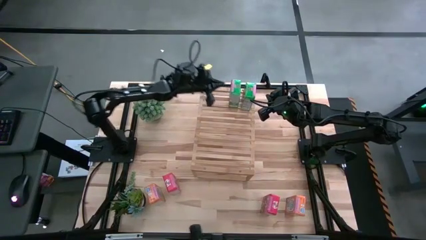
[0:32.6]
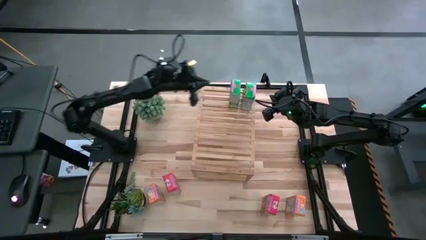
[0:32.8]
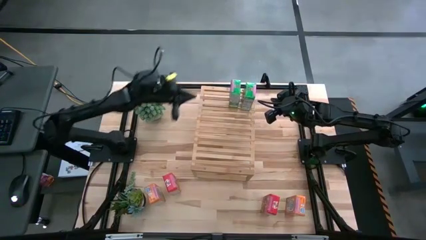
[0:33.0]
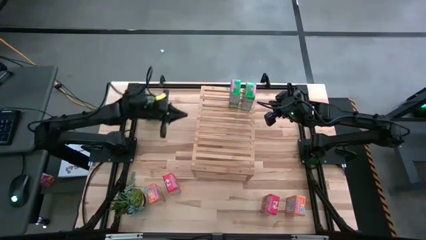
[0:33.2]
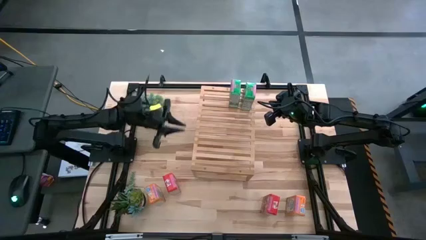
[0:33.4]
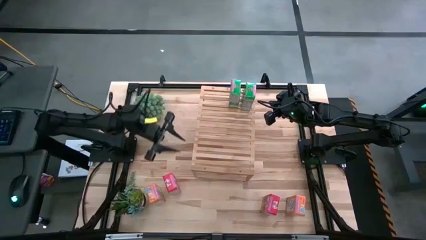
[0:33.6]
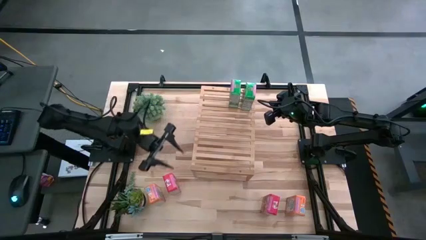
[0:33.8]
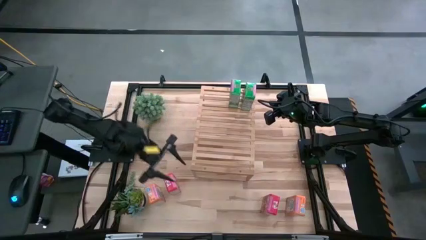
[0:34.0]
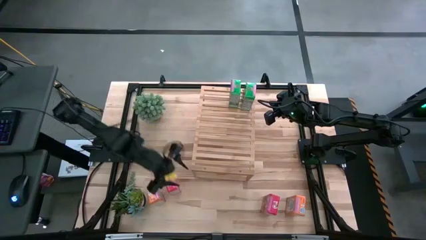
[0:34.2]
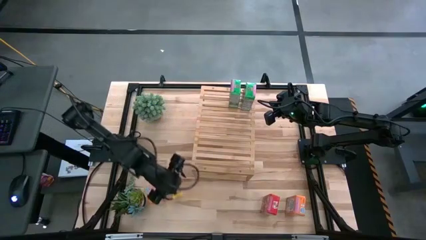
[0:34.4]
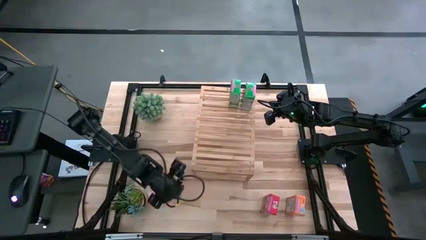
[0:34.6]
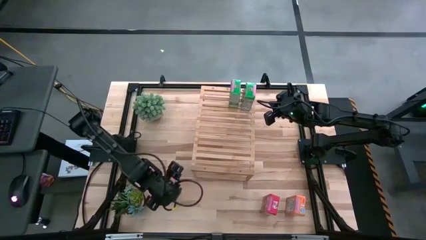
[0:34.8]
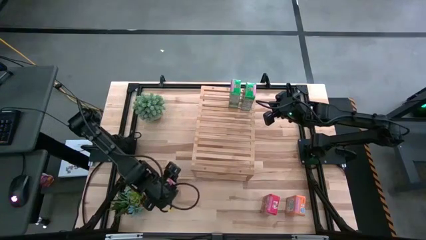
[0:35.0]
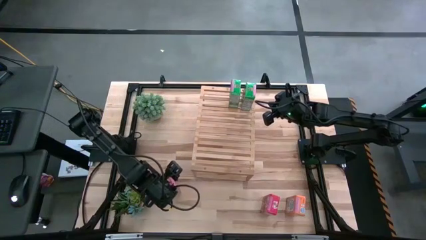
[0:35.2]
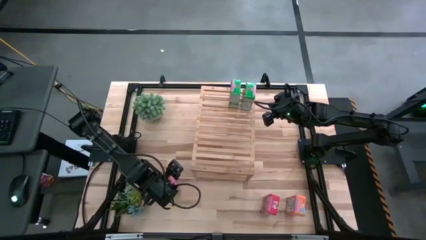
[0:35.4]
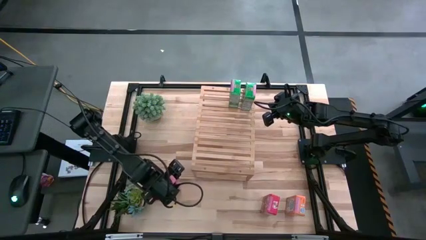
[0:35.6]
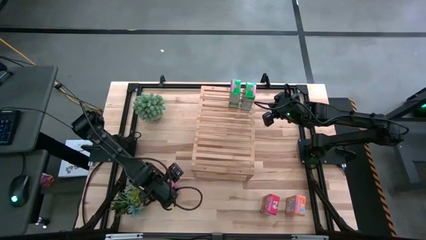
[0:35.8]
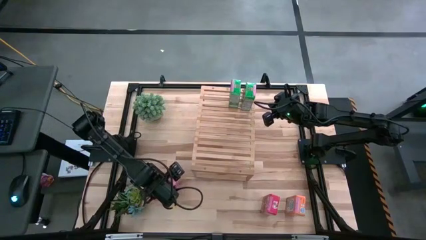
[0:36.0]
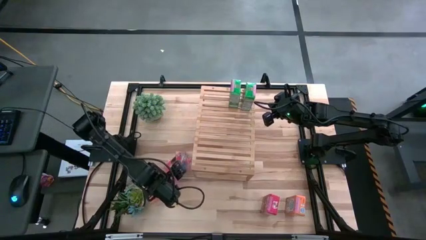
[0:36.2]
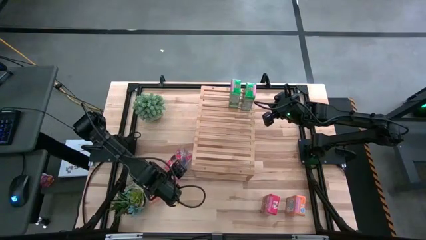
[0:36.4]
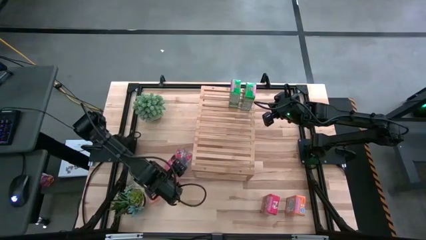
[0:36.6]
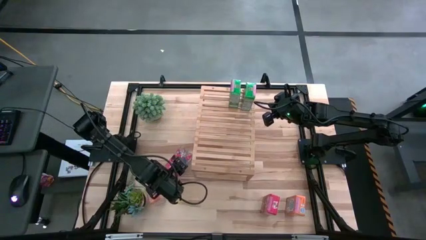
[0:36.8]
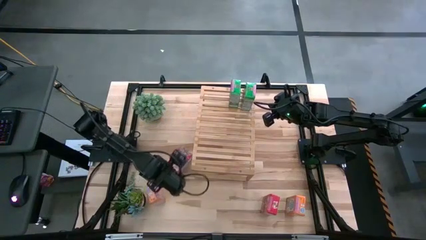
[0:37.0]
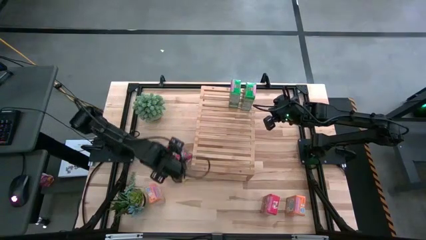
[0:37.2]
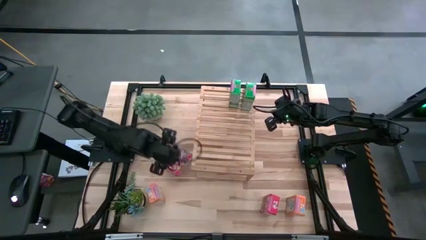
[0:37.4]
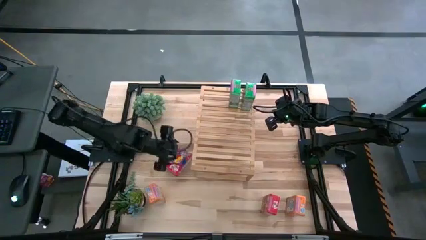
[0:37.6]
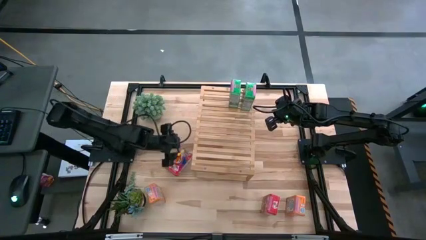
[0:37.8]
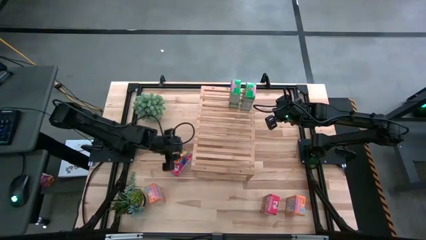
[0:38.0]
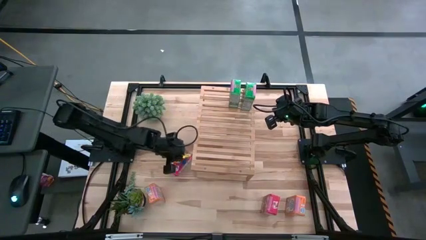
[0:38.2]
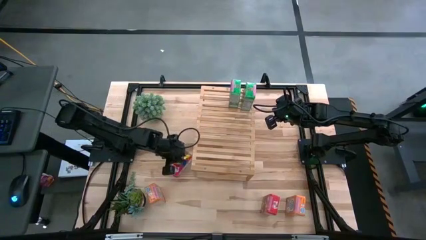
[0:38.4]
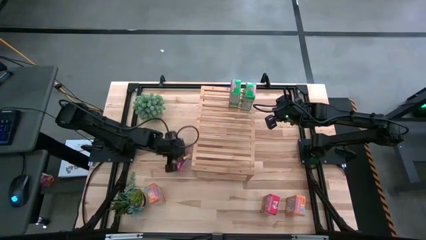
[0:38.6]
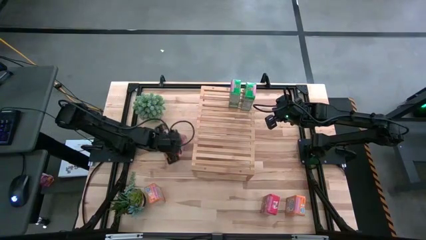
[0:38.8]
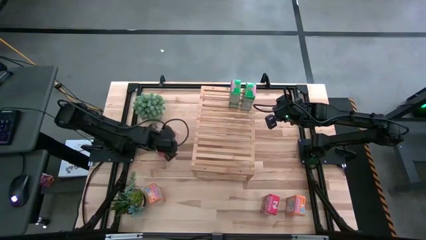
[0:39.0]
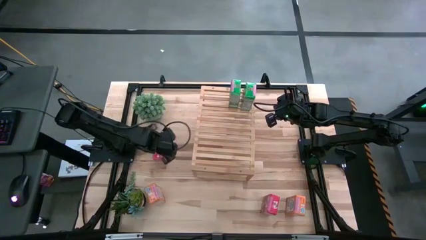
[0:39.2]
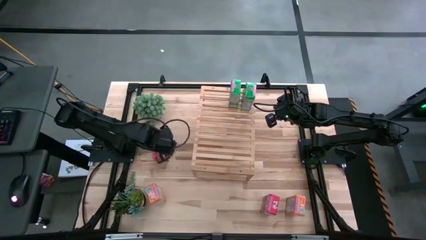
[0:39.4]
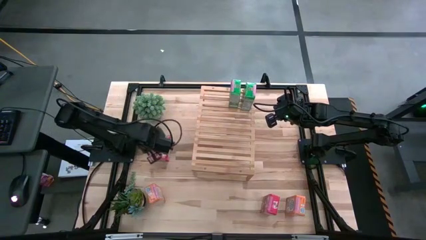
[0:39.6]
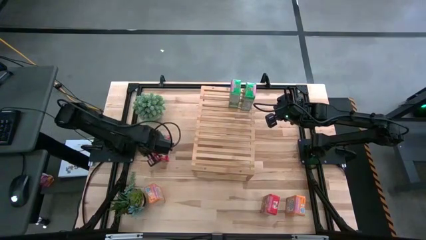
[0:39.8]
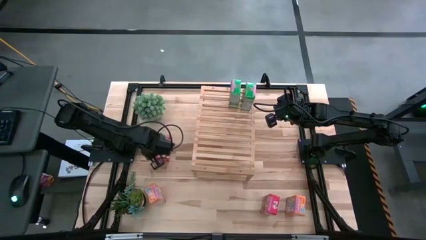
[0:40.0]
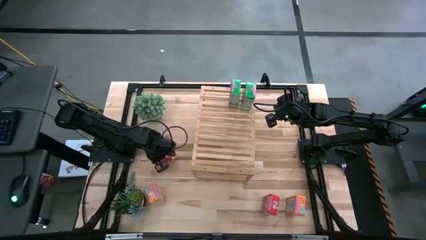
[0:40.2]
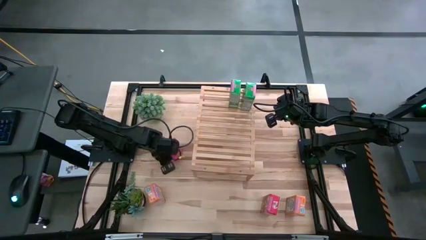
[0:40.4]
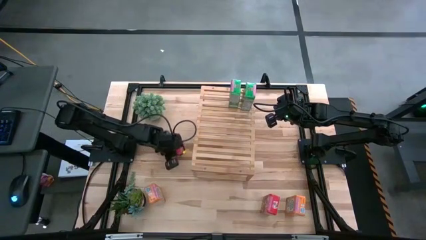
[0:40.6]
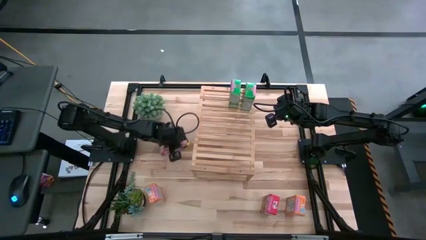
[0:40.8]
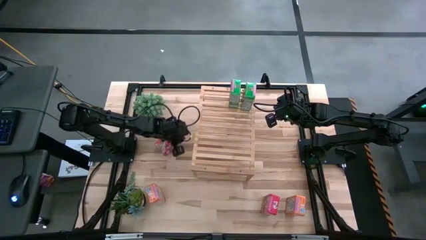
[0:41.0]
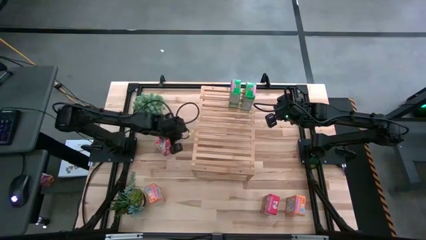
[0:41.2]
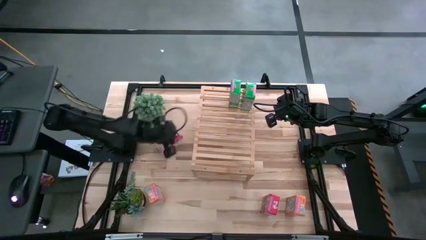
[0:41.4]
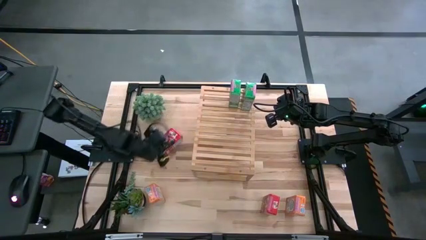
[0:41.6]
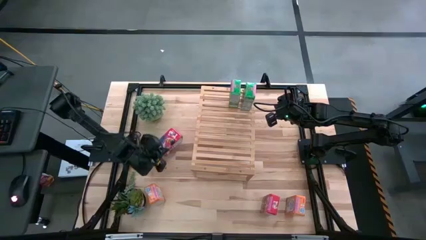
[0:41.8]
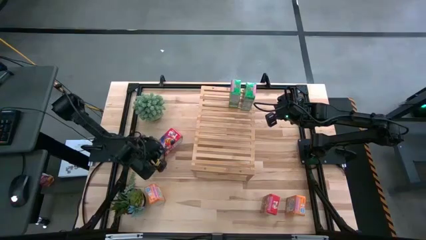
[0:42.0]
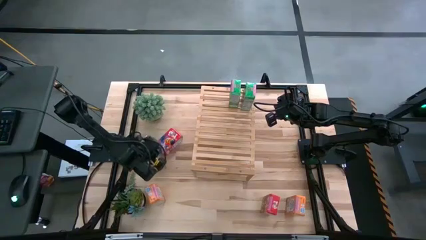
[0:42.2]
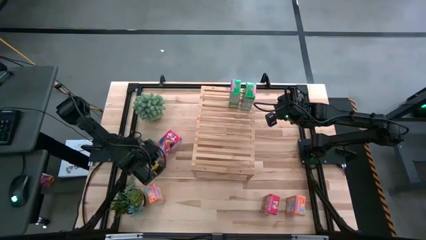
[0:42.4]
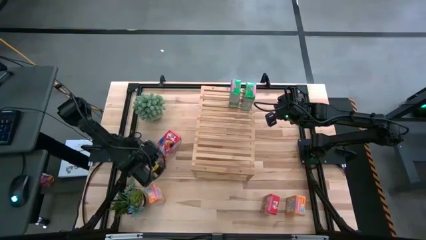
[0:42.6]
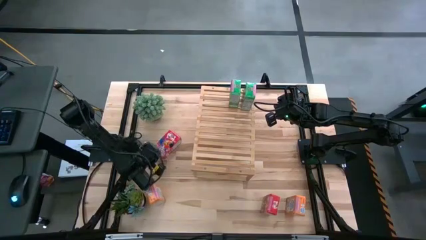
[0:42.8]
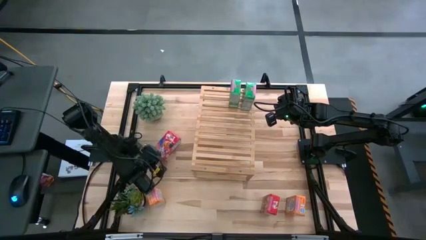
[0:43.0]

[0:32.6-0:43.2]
Task: Stack cereal on shelf
Put the left red cereal box on the shelf

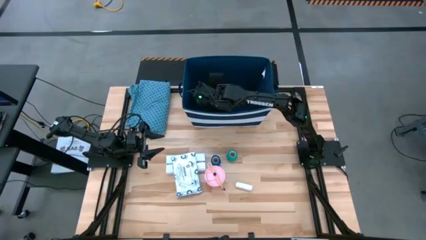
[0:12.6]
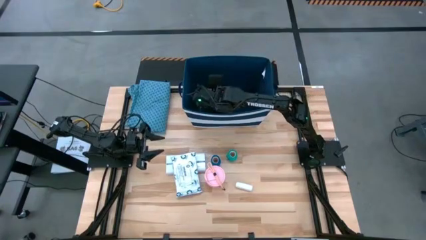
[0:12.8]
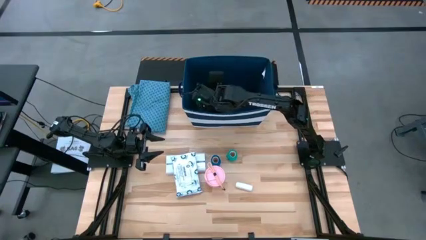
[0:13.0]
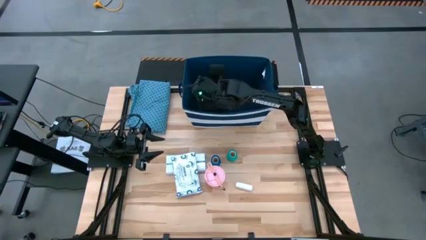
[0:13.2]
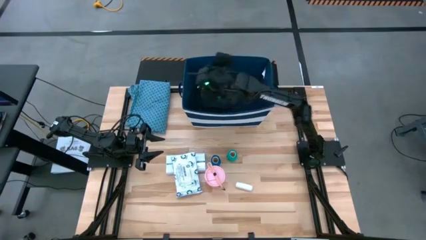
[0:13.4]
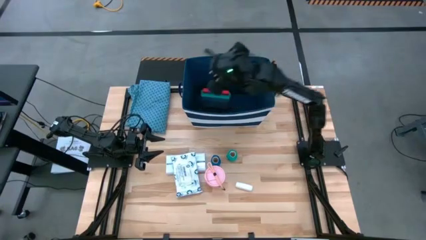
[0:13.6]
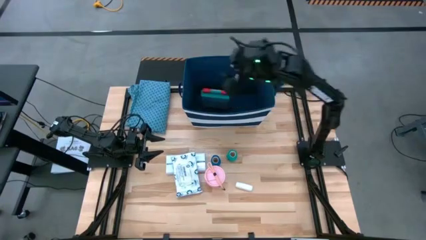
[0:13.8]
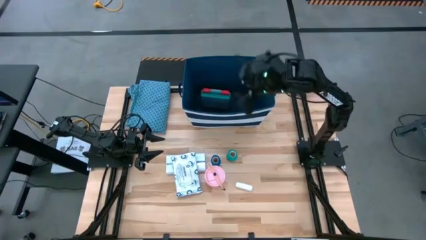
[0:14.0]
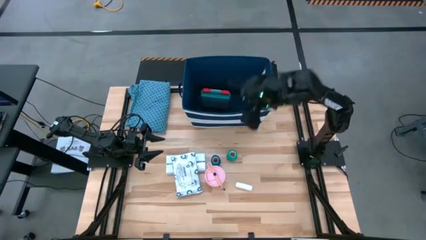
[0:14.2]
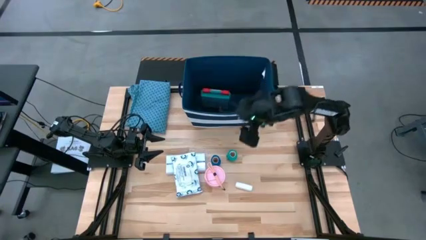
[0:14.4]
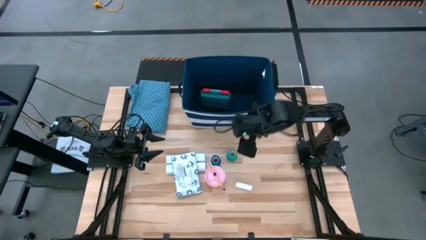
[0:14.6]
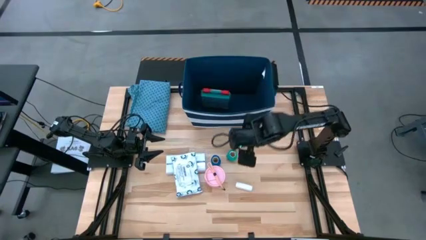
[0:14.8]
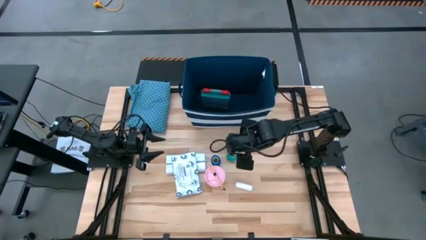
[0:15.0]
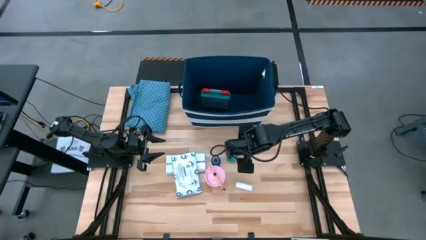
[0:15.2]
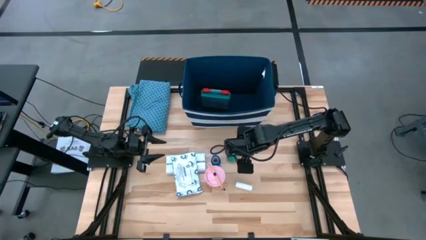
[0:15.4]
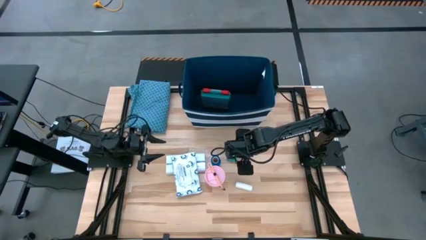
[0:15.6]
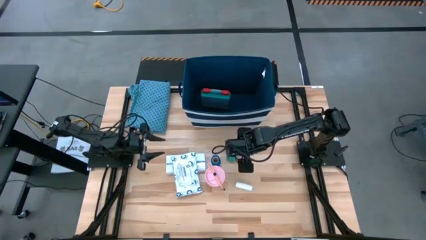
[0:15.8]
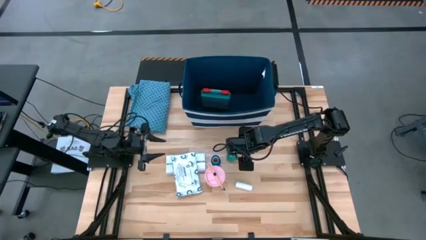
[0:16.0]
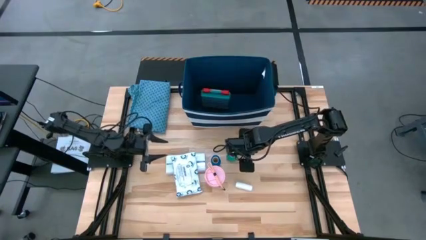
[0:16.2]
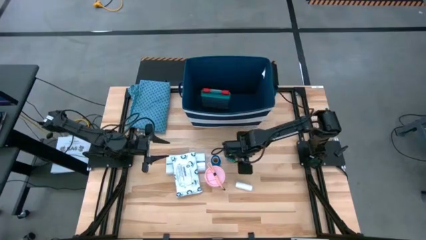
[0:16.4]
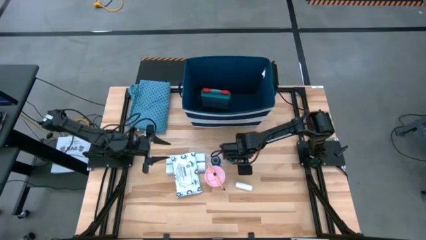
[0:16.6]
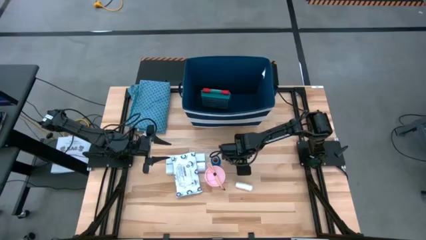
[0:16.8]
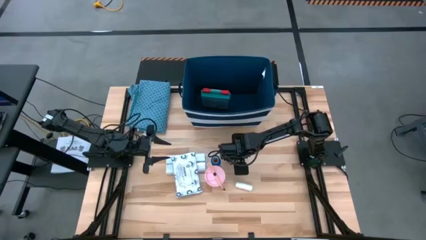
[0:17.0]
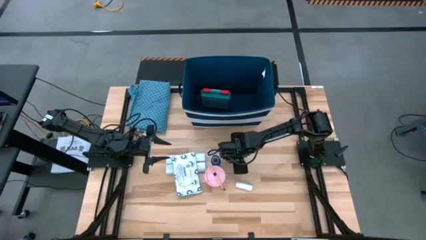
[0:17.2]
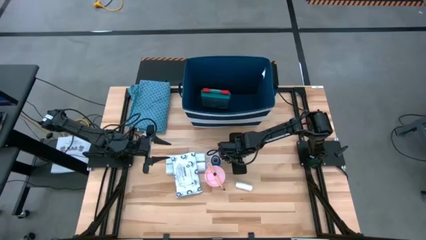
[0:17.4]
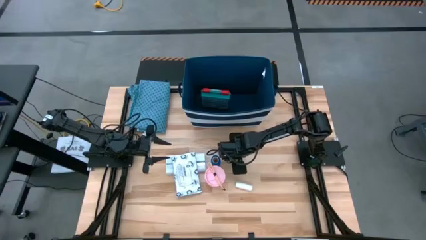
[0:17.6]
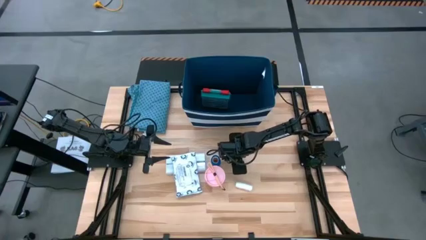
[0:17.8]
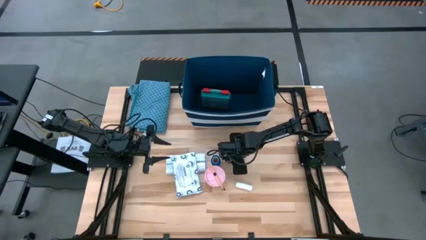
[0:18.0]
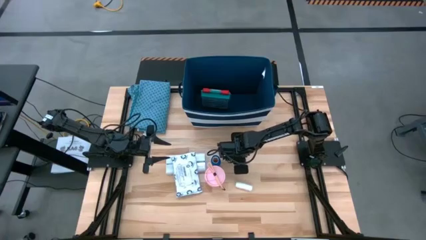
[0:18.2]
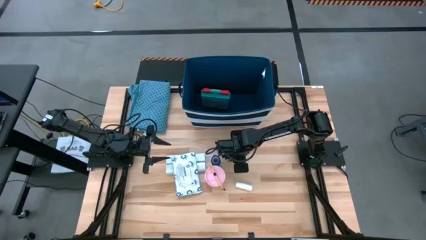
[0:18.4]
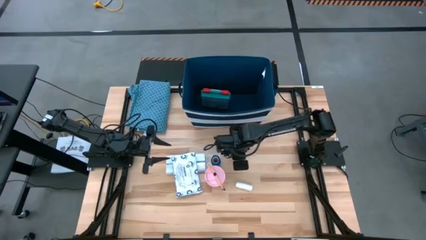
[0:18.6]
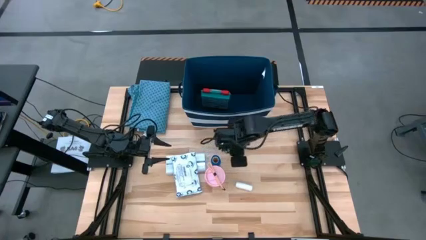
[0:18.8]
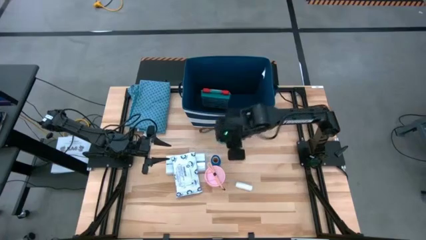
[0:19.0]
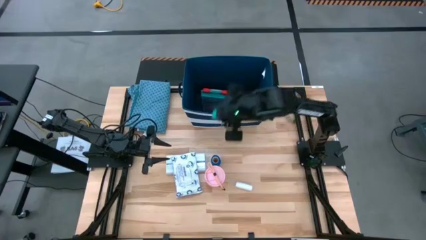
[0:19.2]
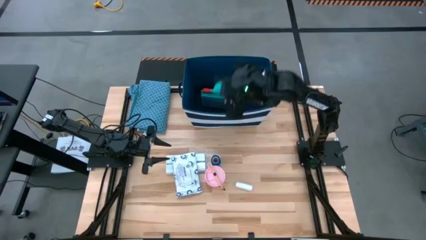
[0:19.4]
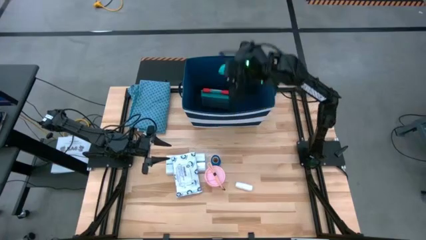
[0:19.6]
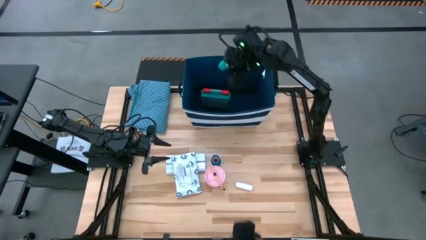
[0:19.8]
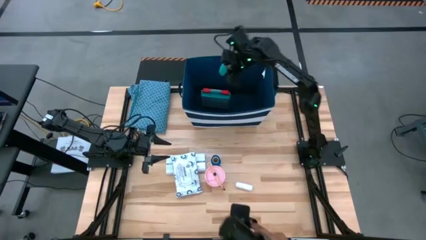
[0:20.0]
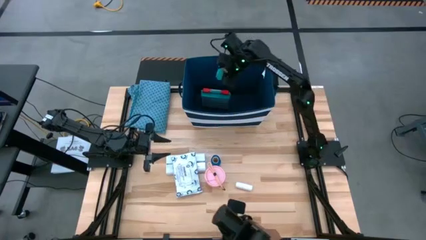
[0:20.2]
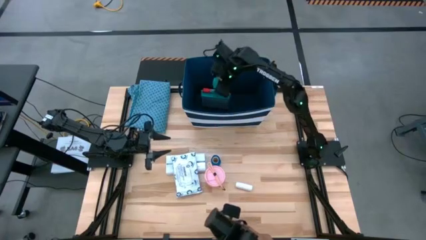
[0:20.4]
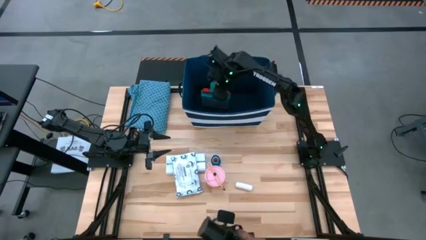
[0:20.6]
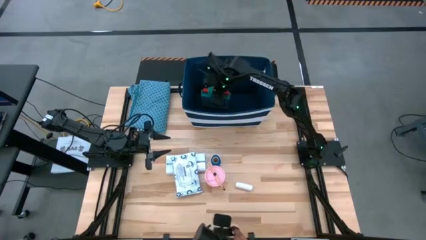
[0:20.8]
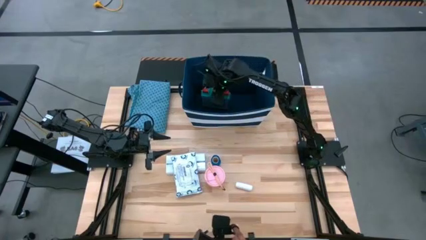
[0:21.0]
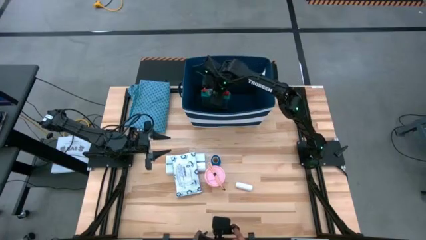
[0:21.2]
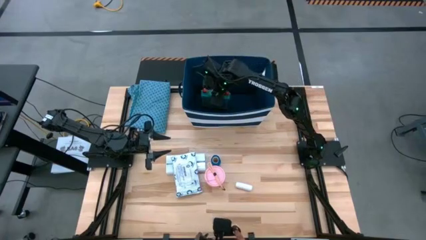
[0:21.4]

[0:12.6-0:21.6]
Task: Pick & place medical supplies in basket/bin
Put the green bandage into the blue bin
